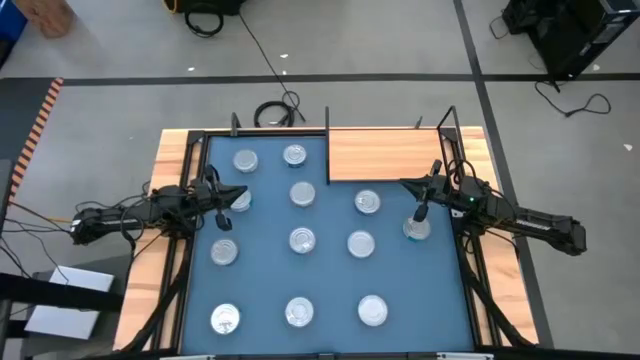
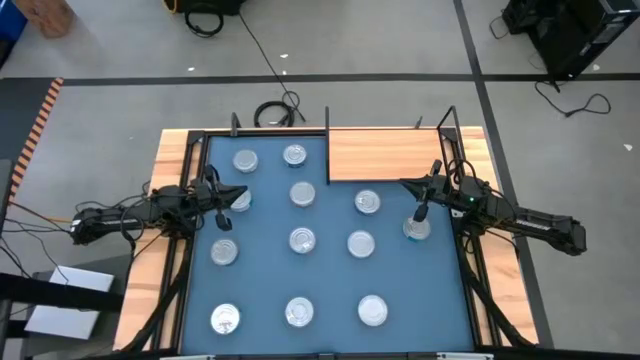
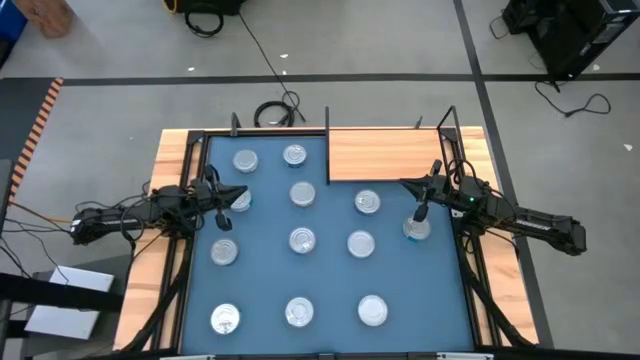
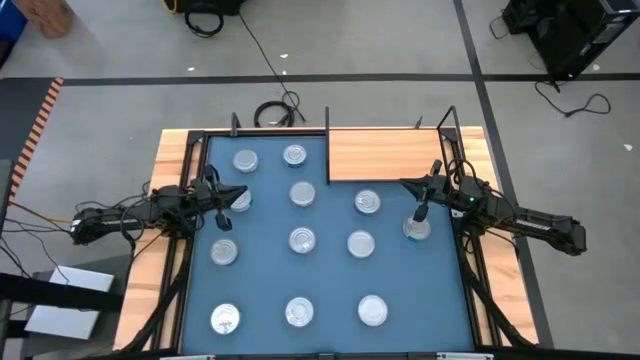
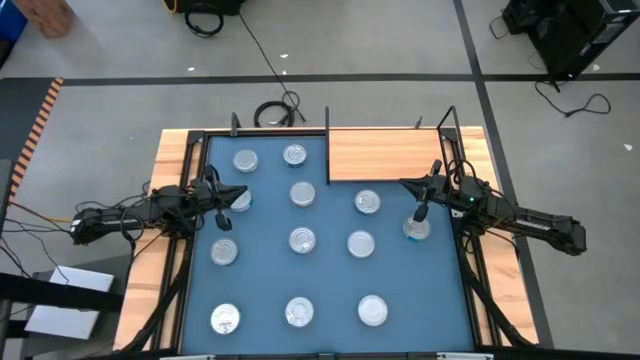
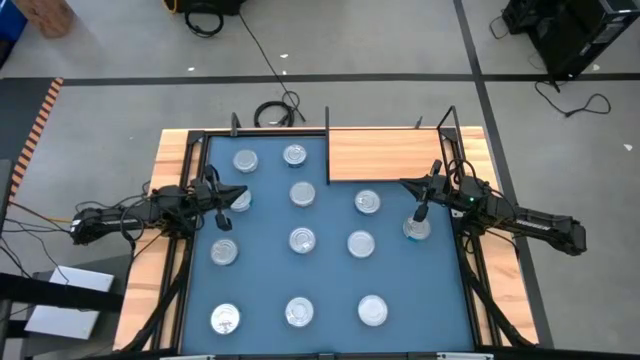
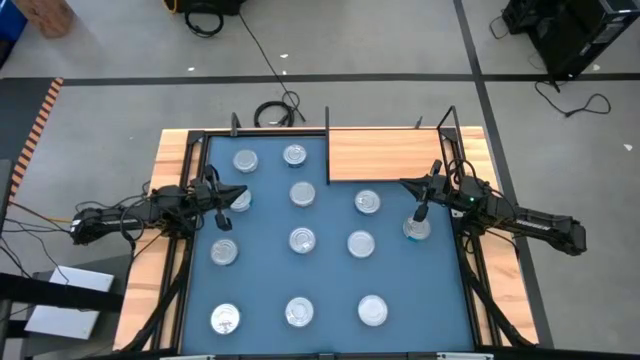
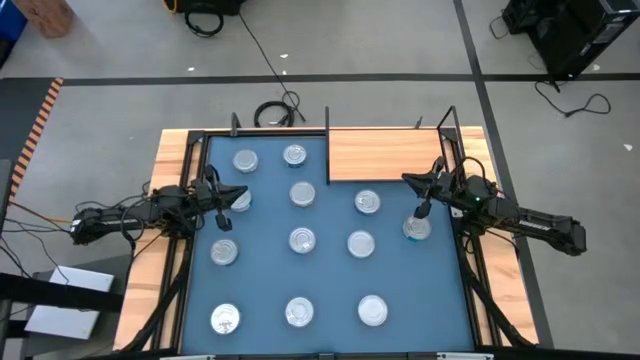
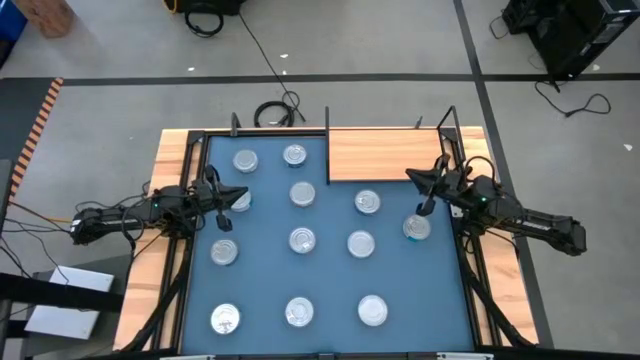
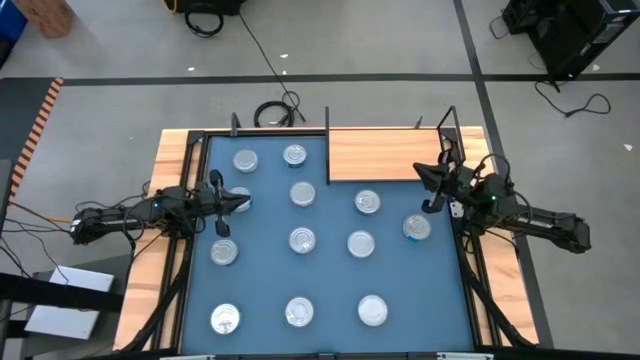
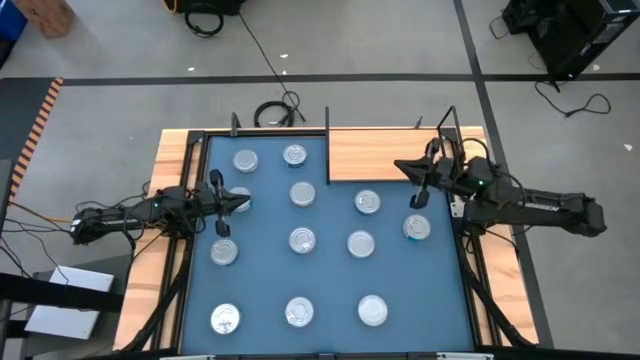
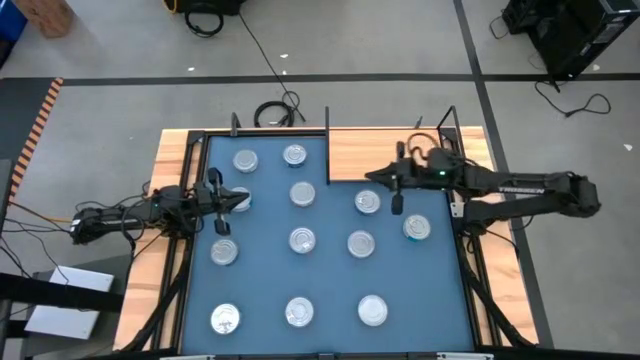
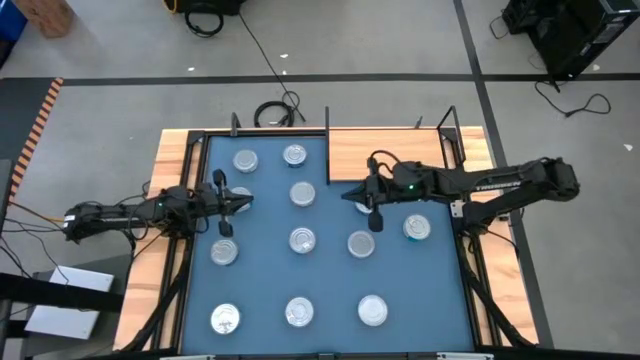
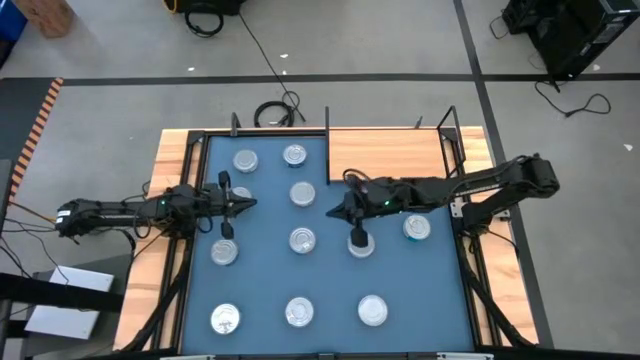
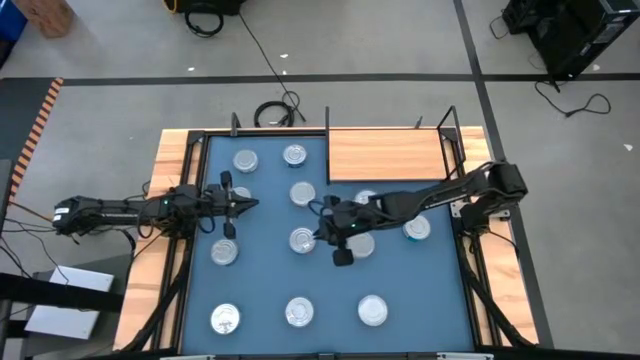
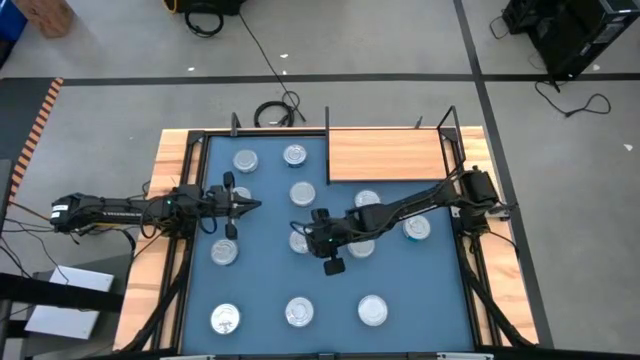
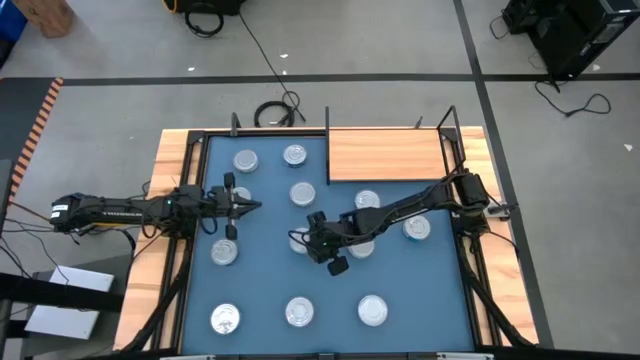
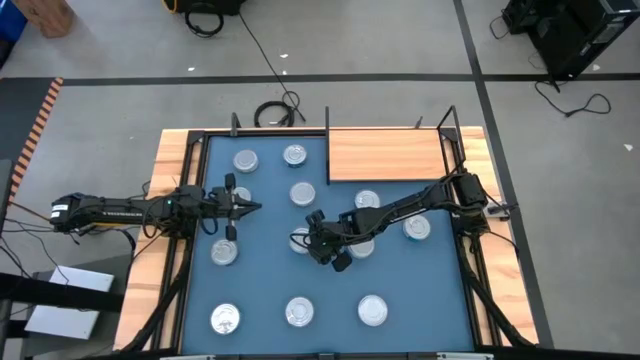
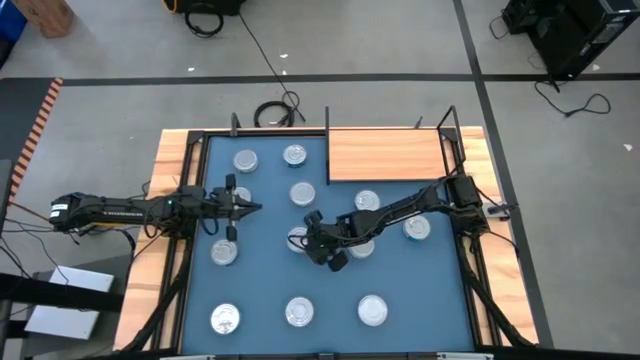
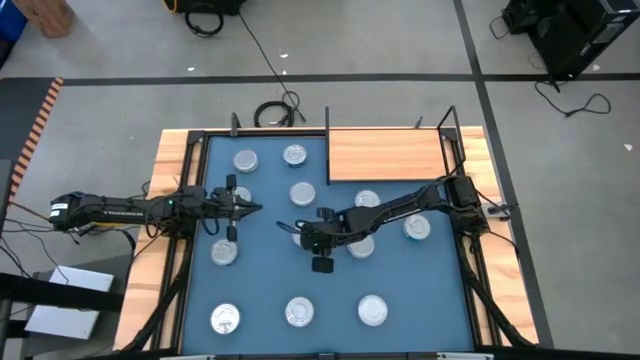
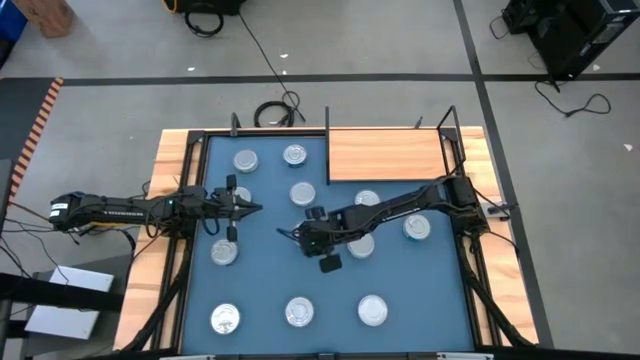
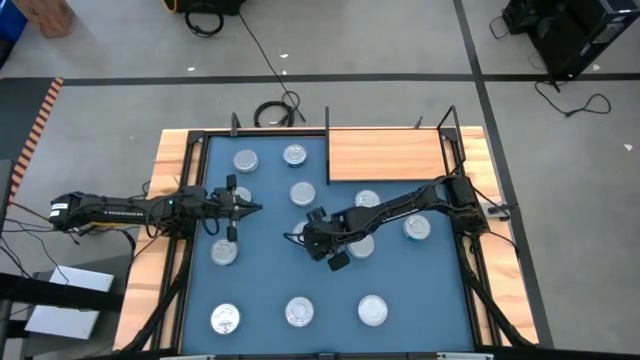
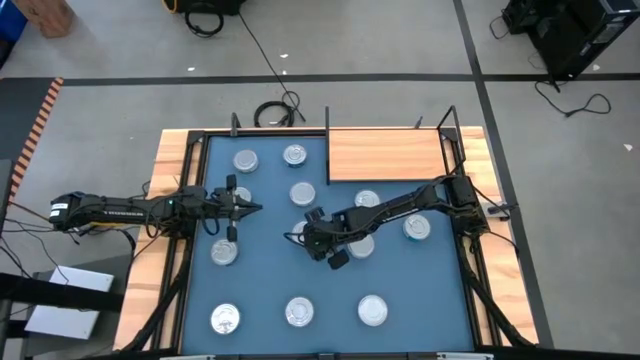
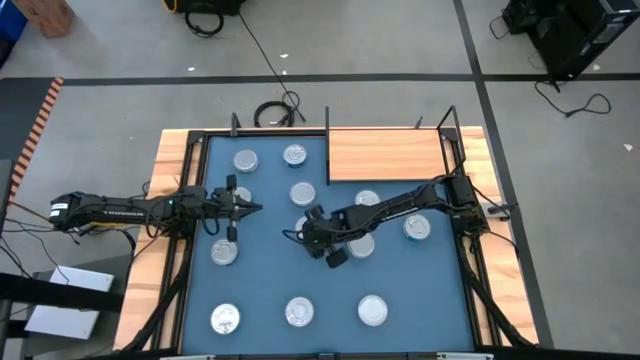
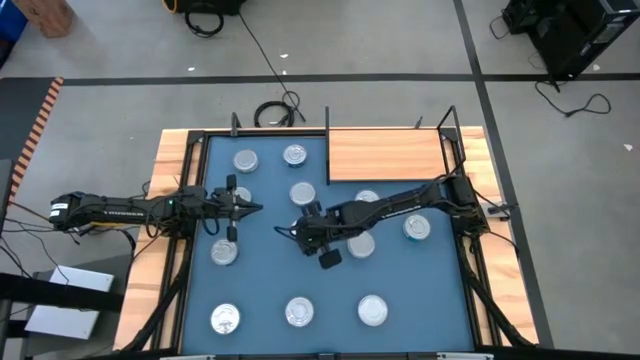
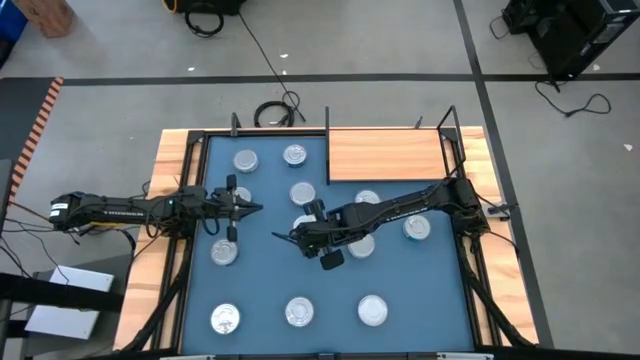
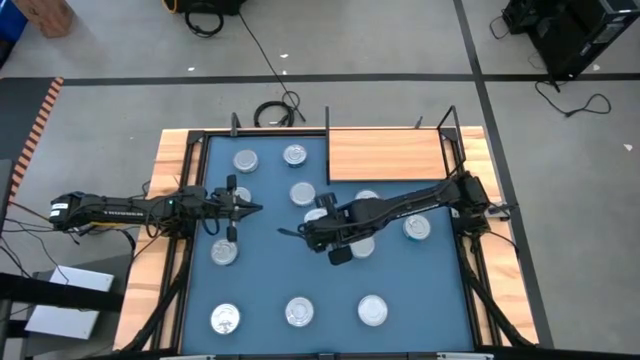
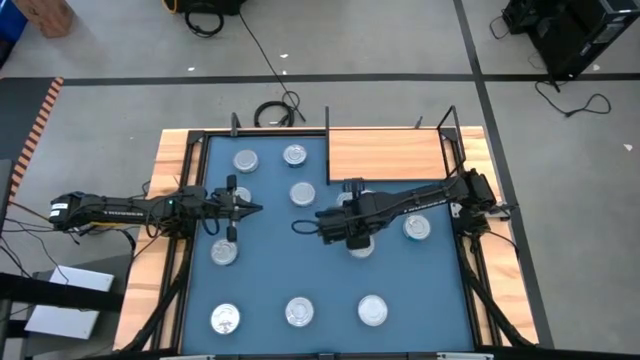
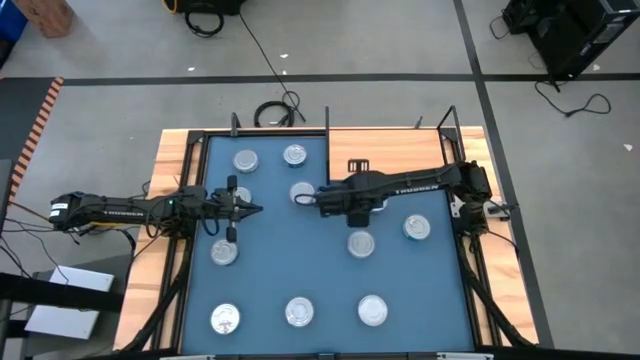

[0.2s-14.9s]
Task: Stack canned seafood by type on shelf
Put the center yellow and blue tuna can on the shelf

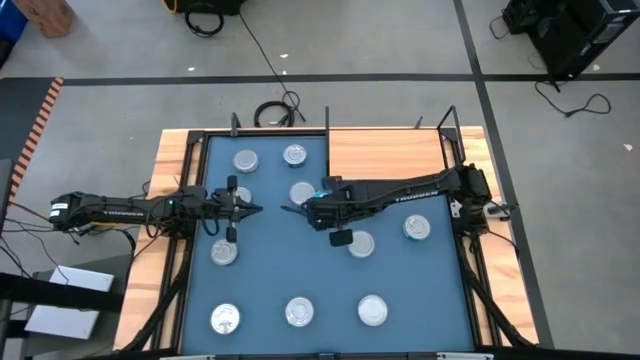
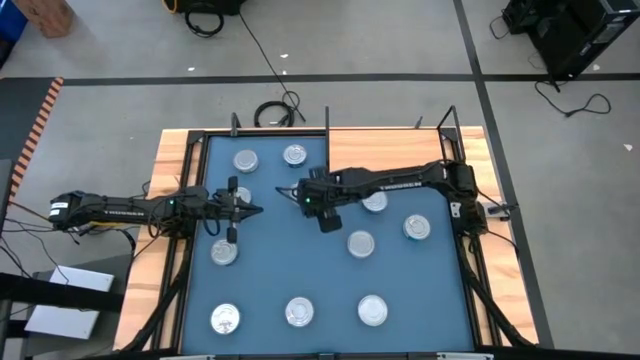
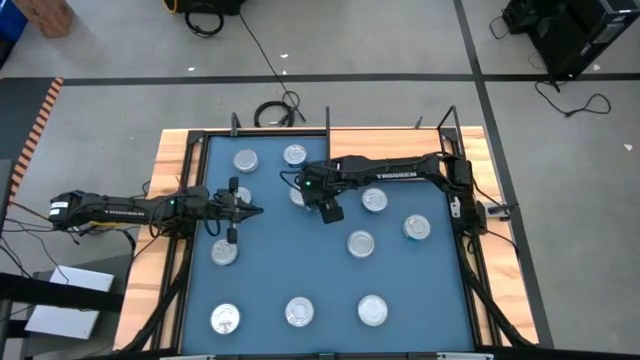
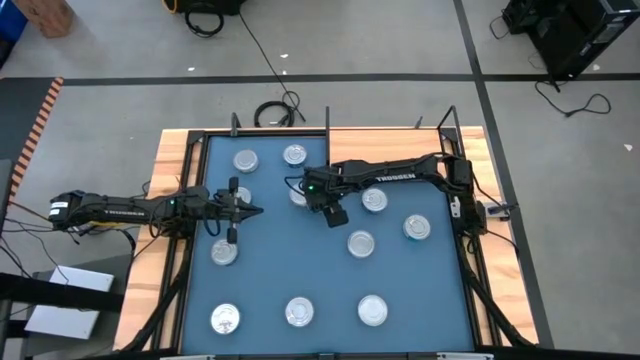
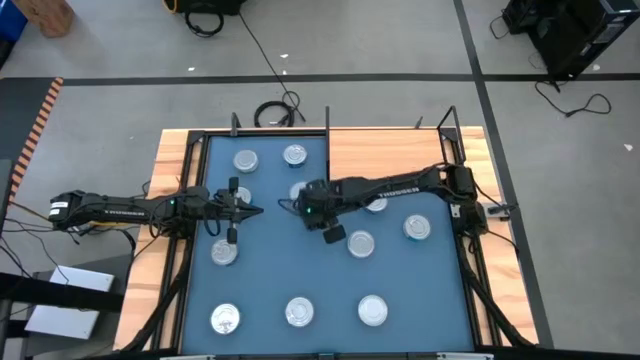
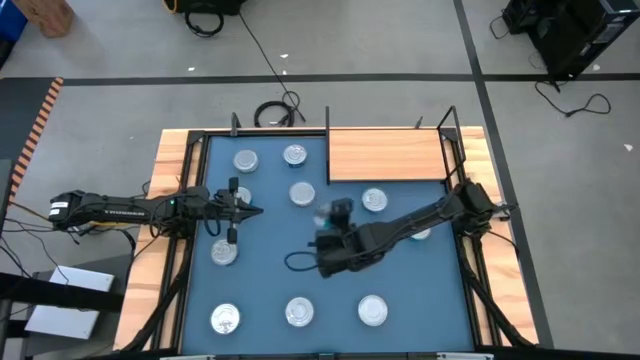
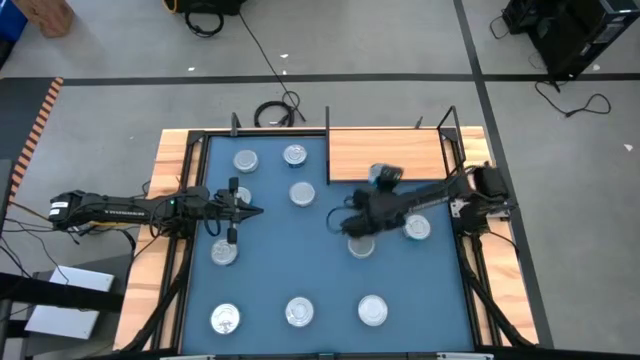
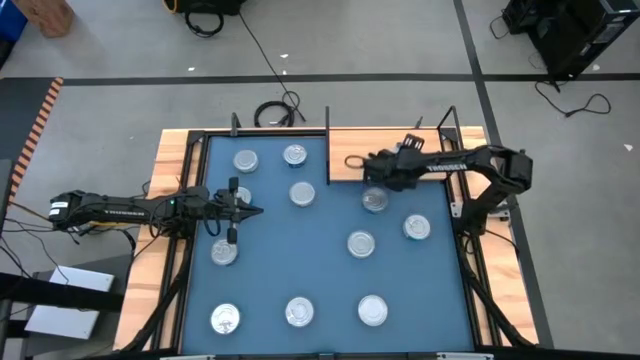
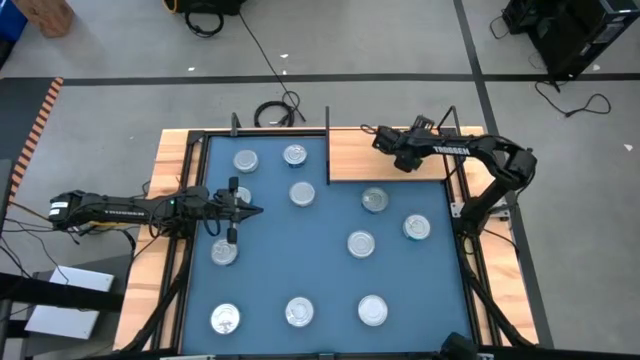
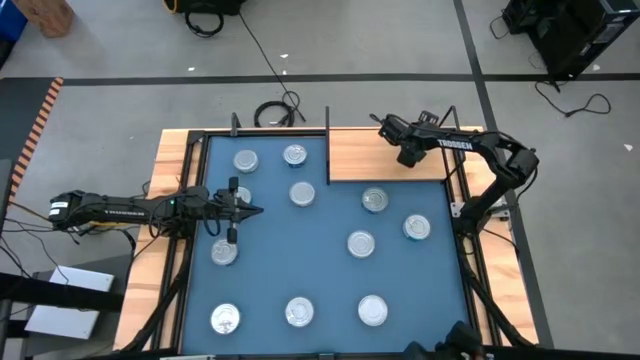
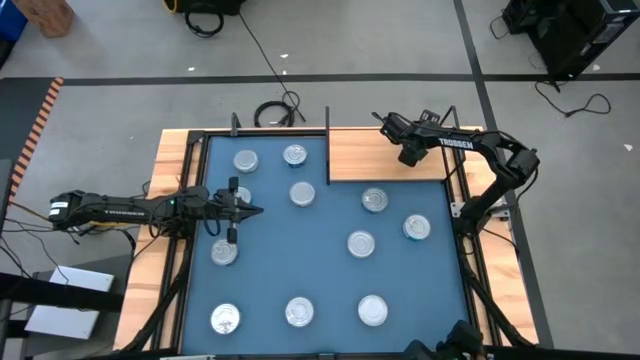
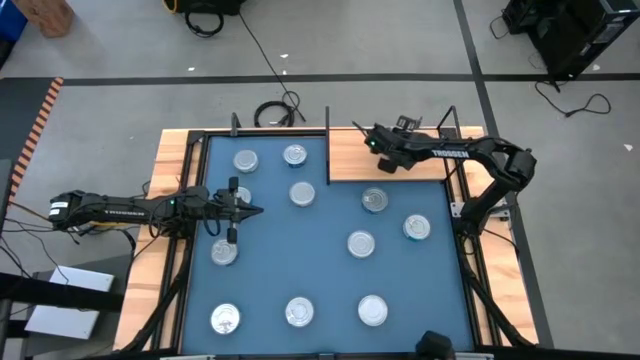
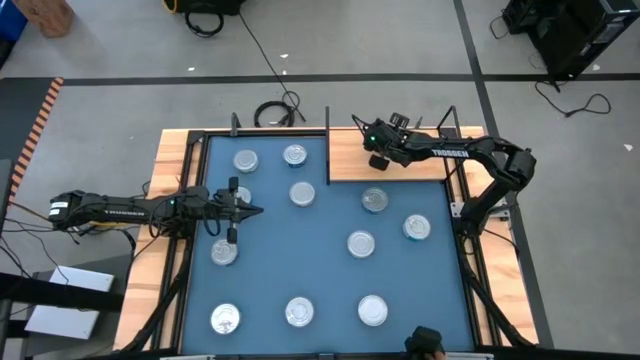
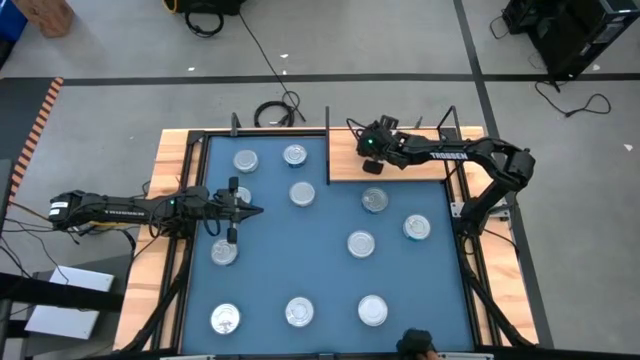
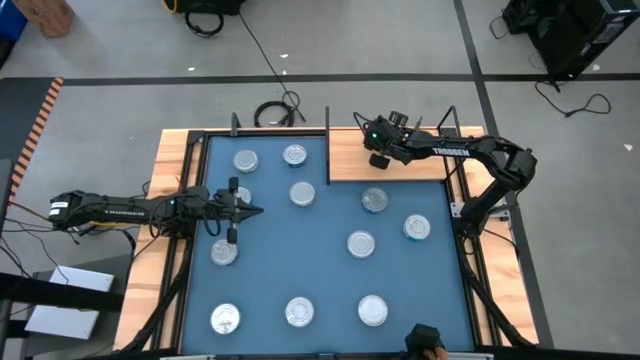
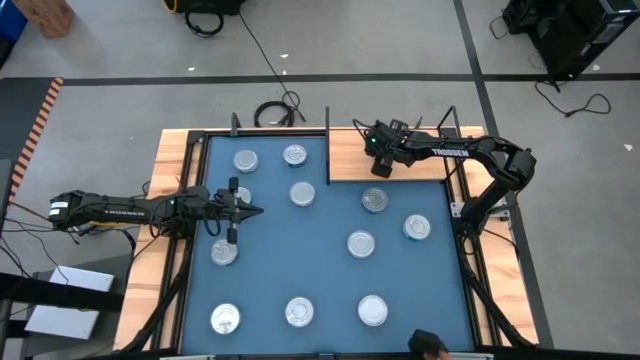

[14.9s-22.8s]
Put the center yellow and blue tuna can on the shelf
